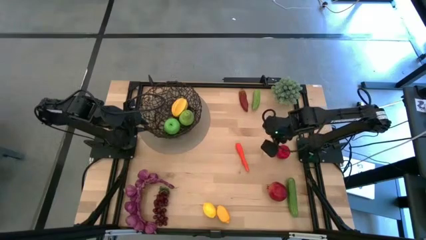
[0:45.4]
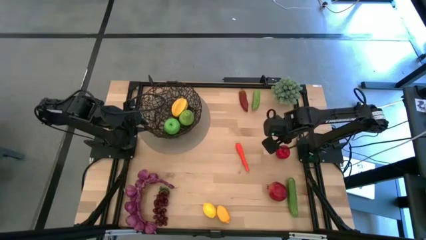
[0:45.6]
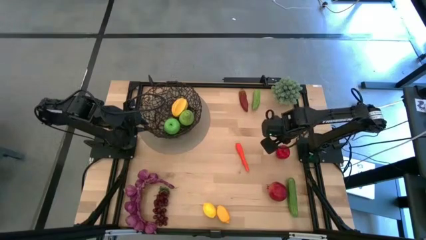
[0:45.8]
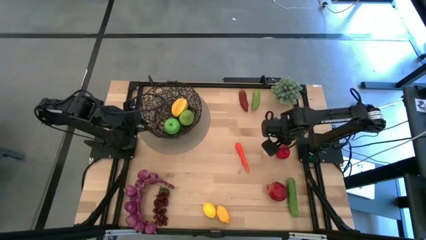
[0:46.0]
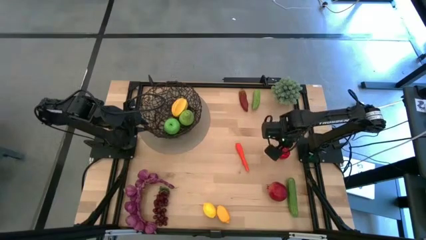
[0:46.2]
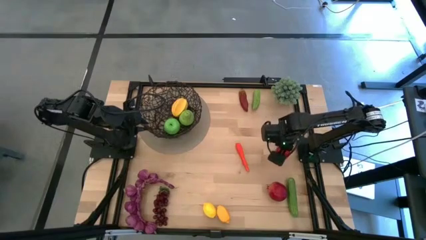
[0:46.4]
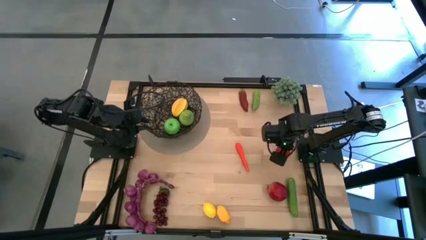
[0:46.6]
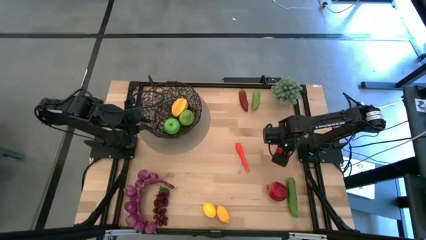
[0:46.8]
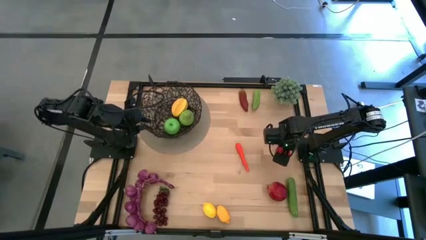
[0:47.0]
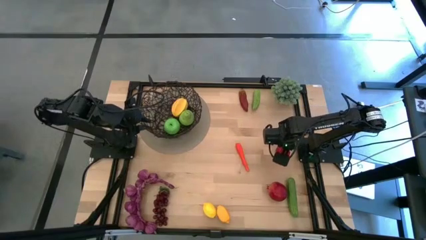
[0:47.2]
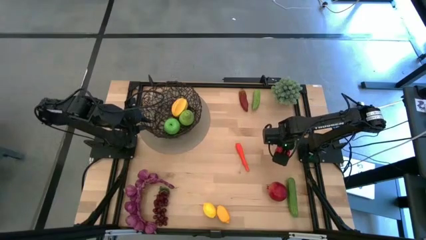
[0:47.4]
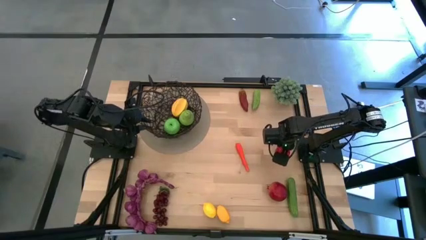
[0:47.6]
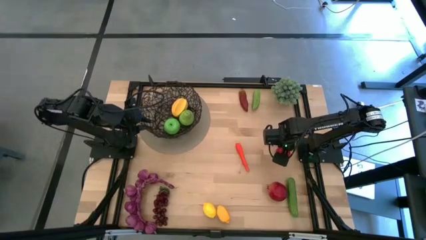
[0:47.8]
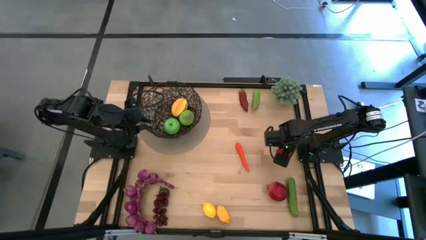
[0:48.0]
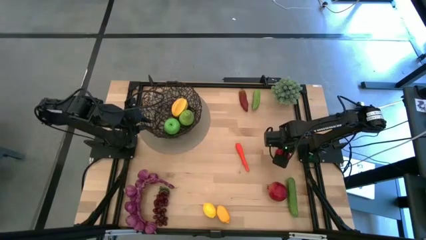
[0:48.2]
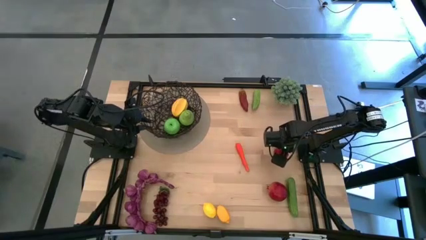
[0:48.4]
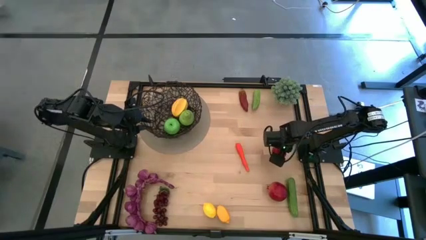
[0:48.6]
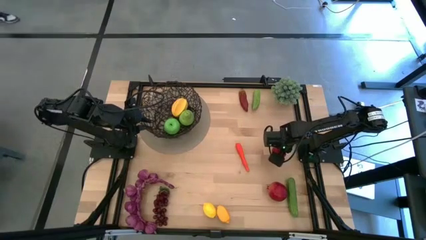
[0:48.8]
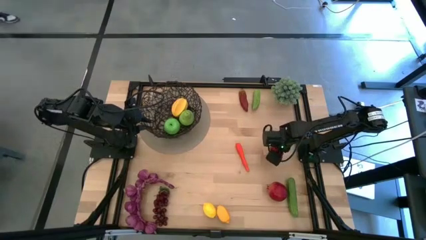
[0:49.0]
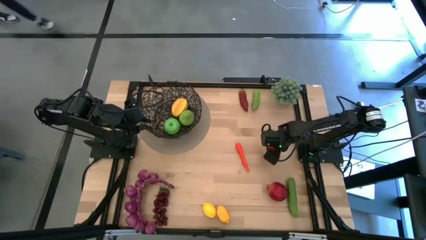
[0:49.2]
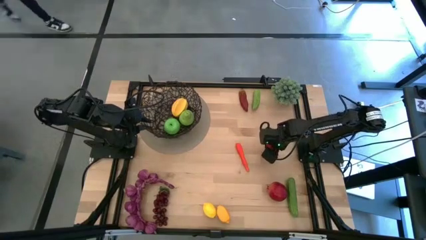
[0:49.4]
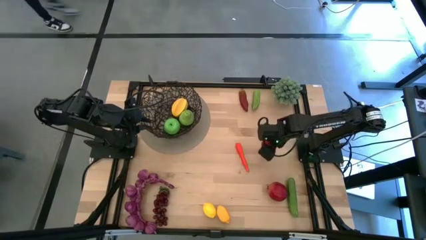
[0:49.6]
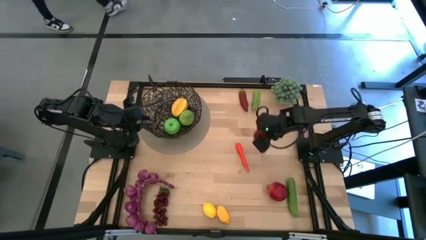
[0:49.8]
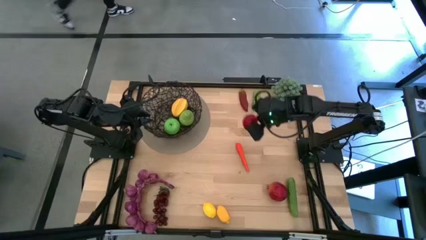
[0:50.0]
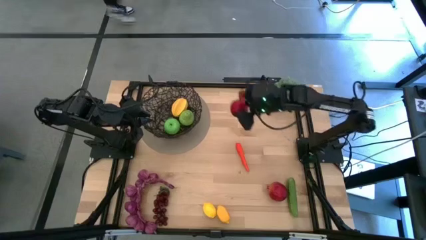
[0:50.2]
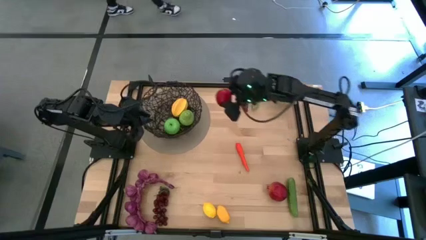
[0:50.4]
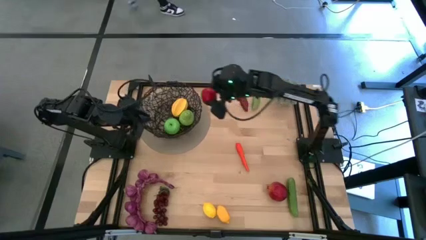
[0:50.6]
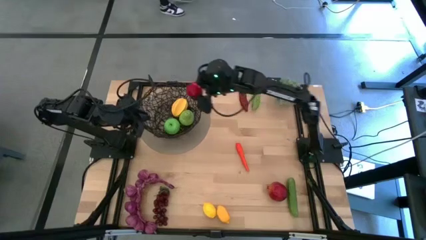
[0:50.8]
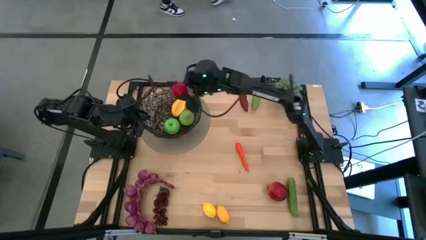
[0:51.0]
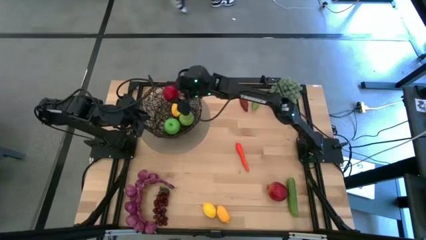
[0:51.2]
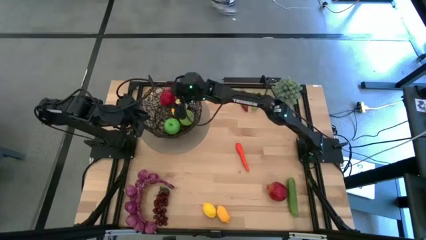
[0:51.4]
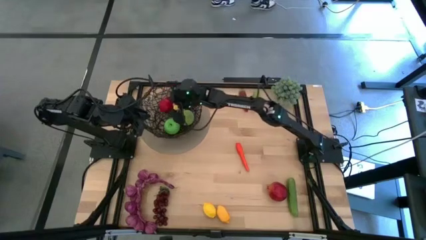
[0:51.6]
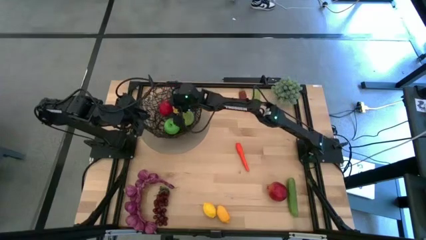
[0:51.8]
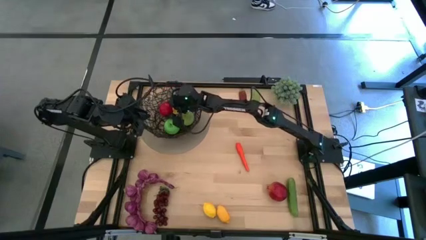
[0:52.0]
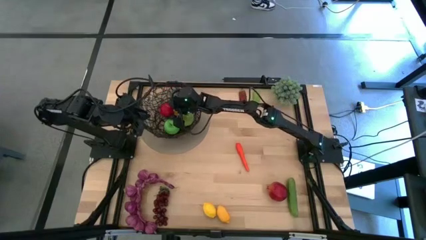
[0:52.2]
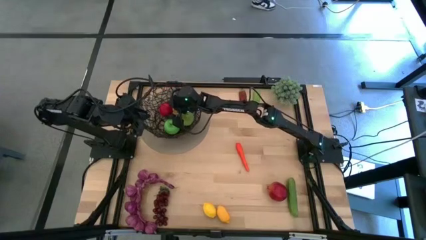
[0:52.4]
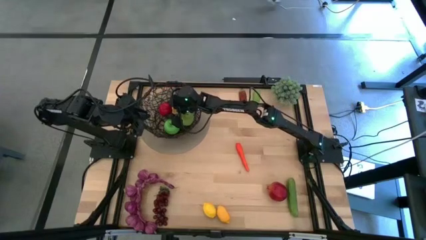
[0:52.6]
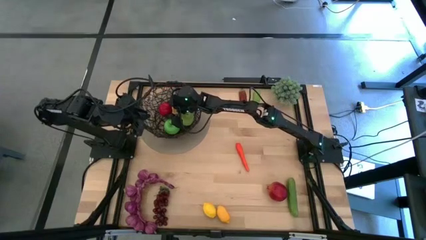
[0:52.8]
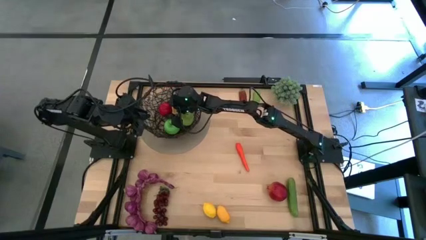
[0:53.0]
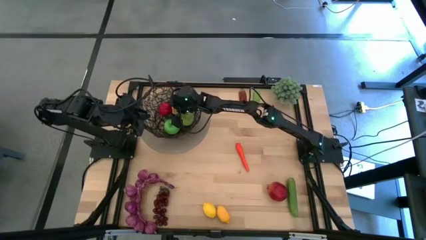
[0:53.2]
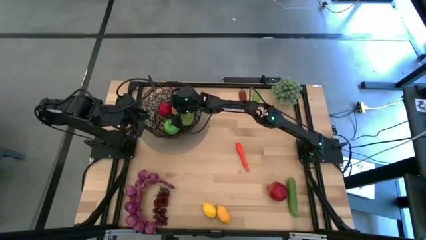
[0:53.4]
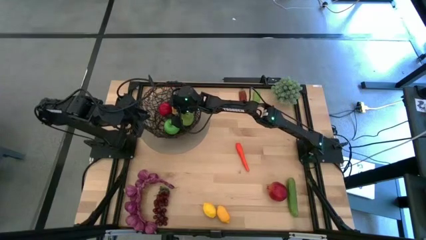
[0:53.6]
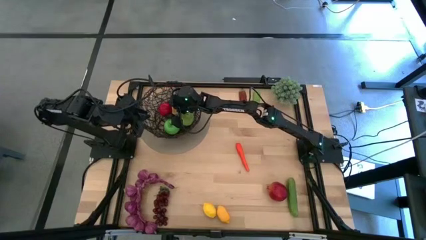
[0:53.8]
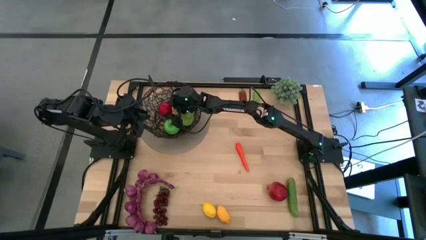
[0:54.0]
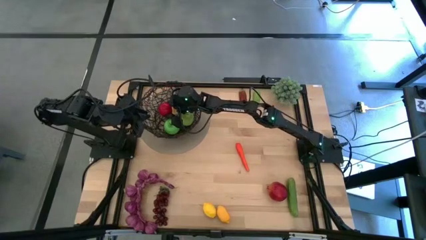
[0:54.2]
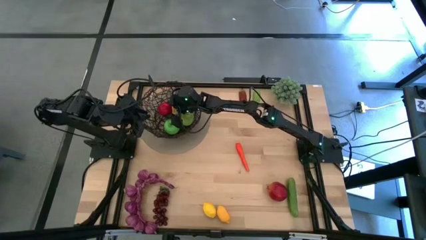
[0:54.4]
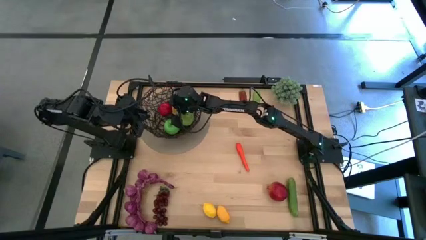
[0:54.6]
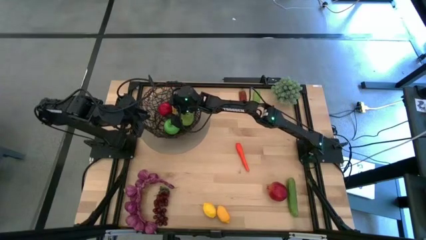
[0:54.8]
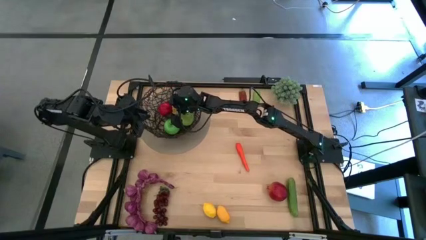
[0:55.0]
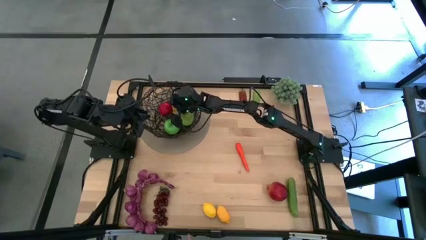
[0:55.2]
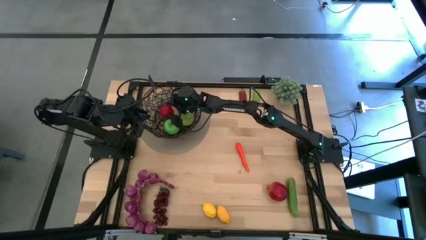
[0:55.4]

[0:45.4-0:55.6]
Task: Build produce basket
Put the red apple into the black wire basket
